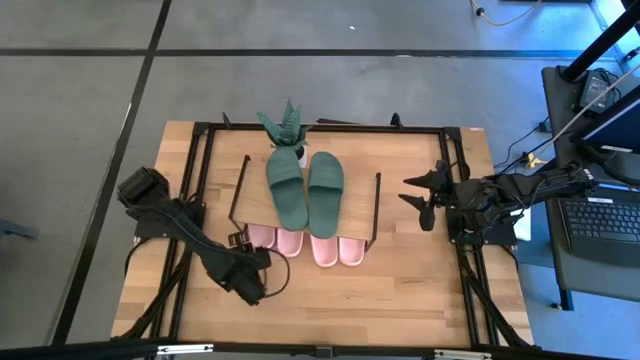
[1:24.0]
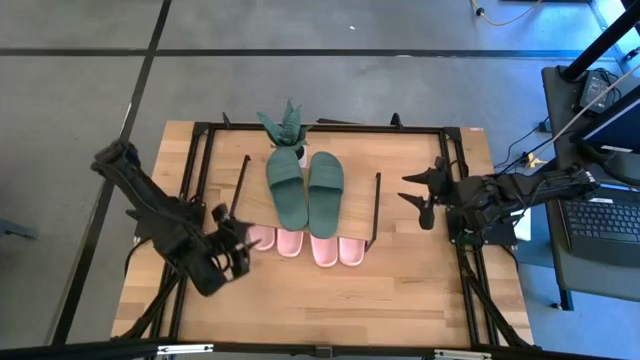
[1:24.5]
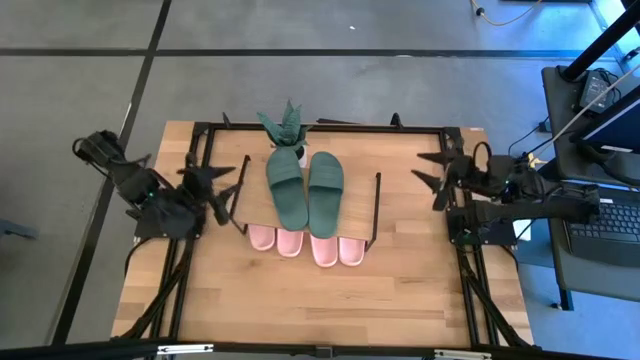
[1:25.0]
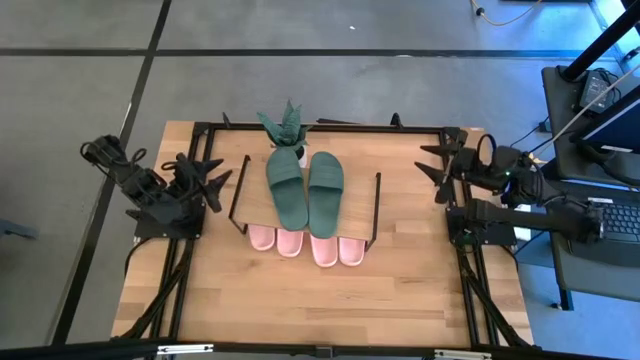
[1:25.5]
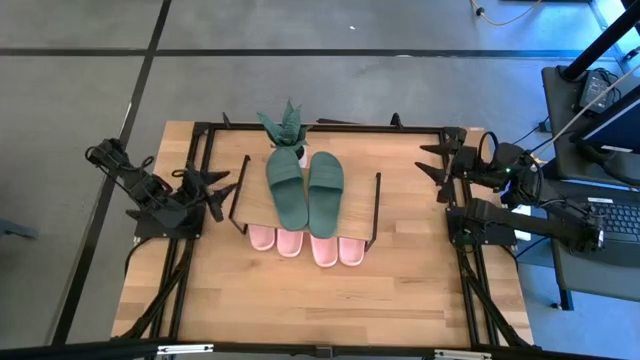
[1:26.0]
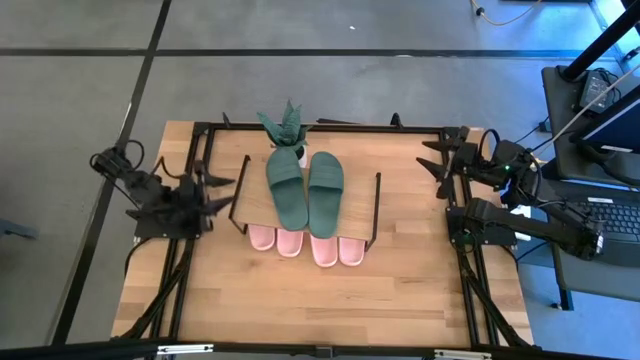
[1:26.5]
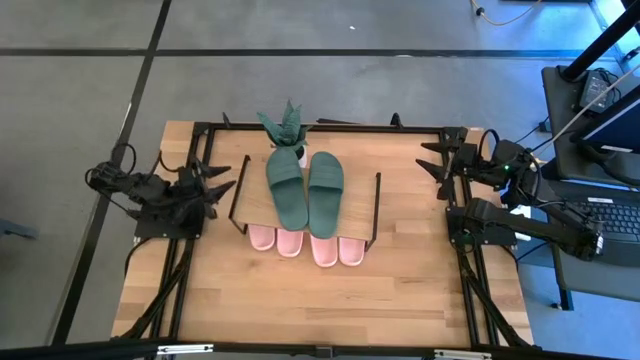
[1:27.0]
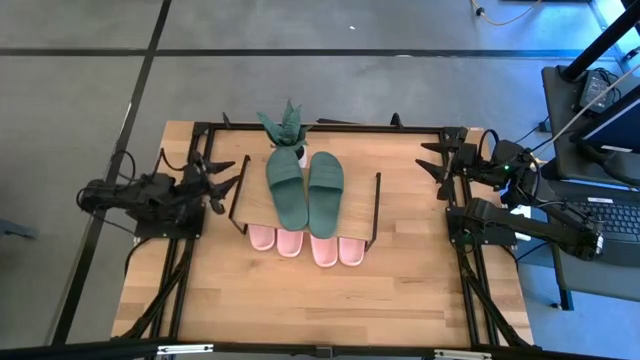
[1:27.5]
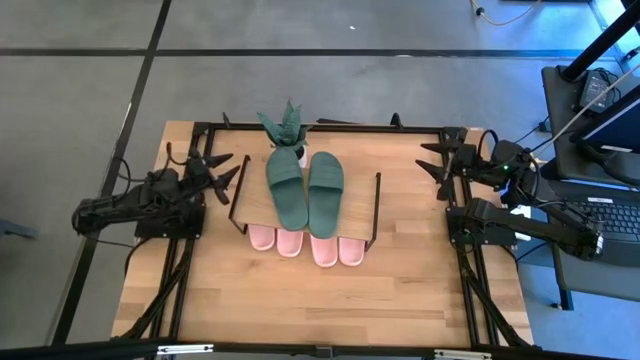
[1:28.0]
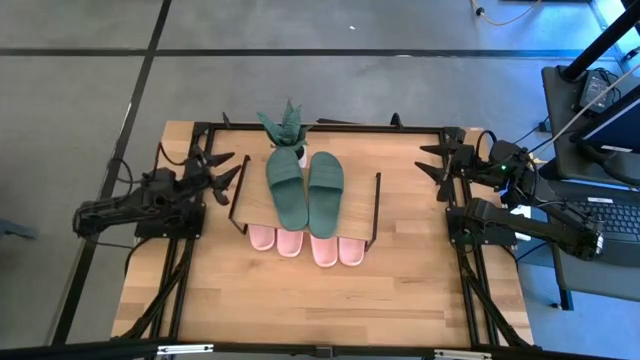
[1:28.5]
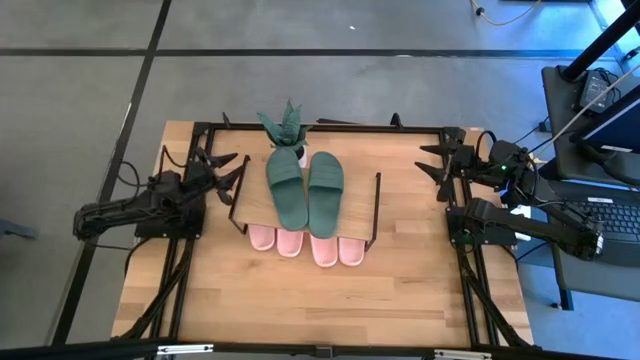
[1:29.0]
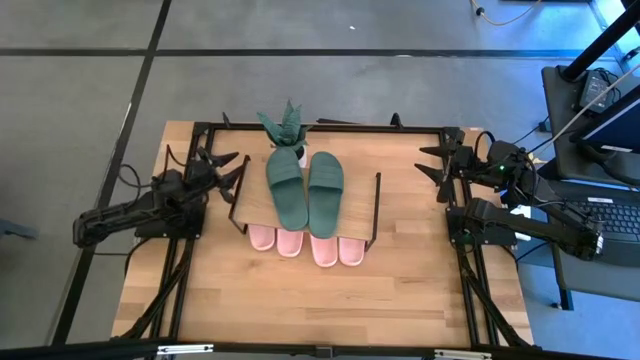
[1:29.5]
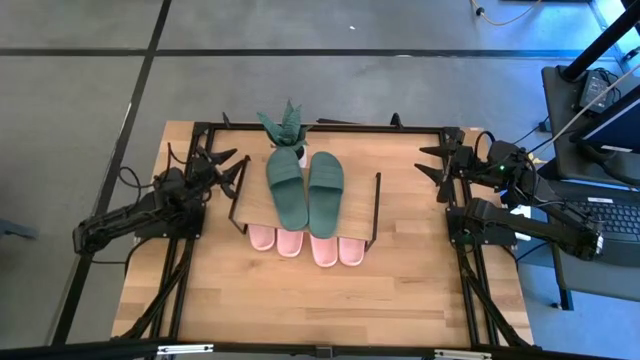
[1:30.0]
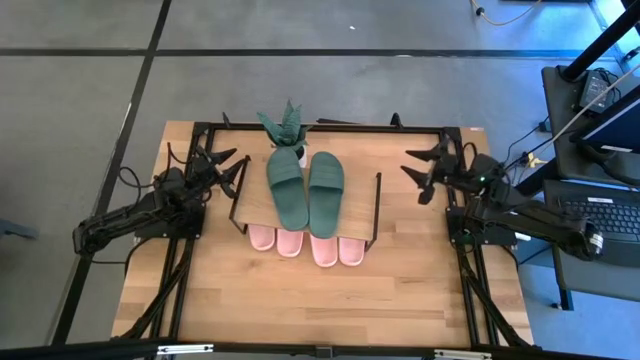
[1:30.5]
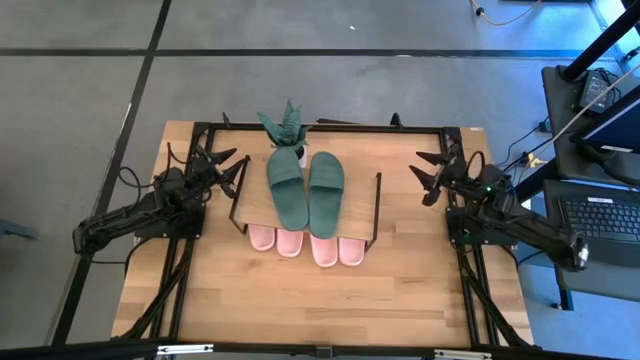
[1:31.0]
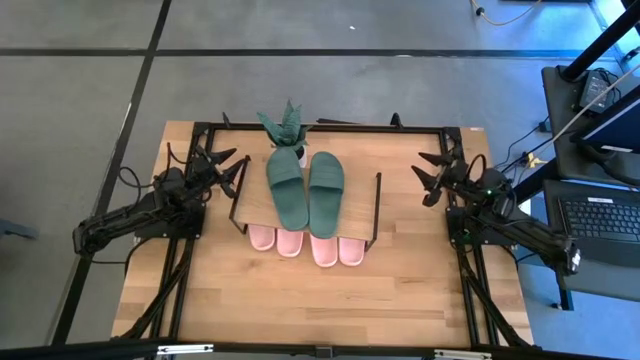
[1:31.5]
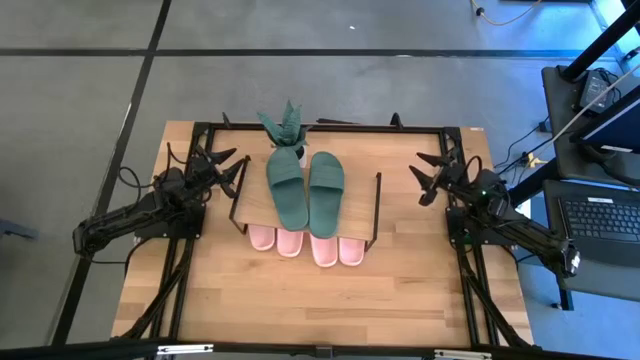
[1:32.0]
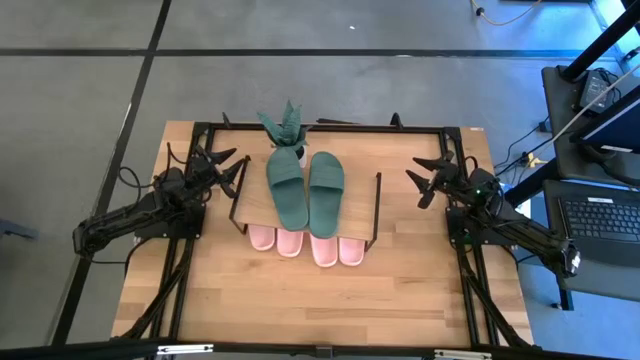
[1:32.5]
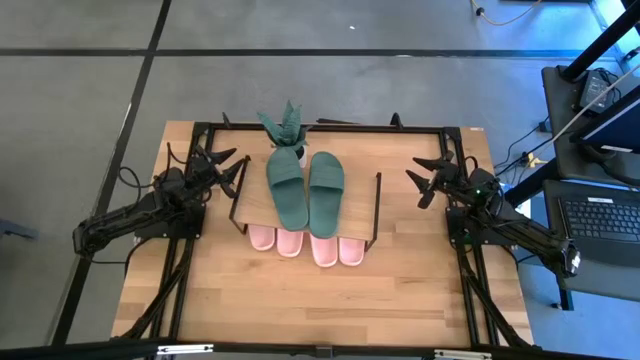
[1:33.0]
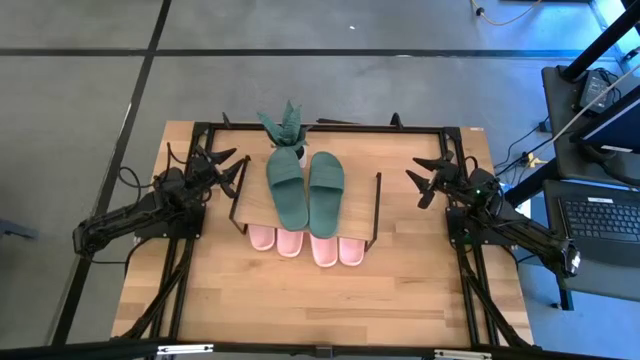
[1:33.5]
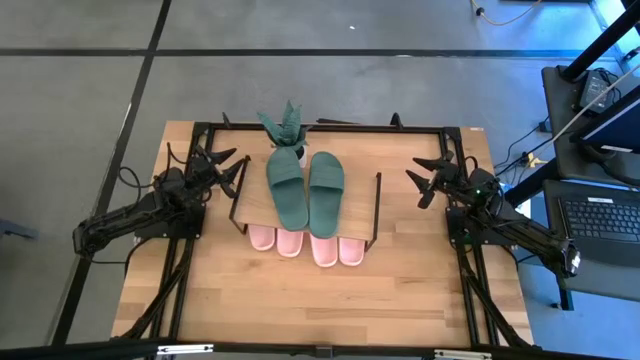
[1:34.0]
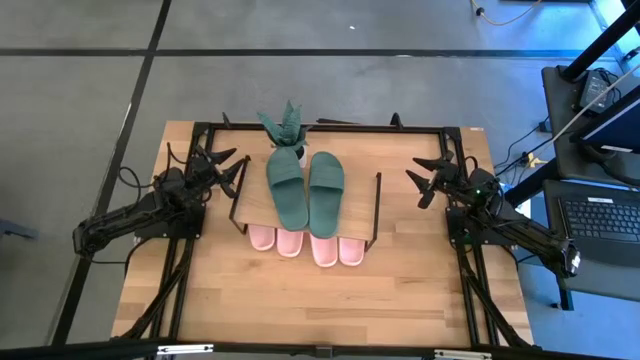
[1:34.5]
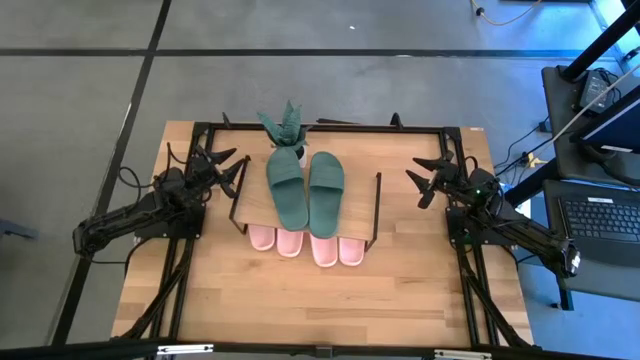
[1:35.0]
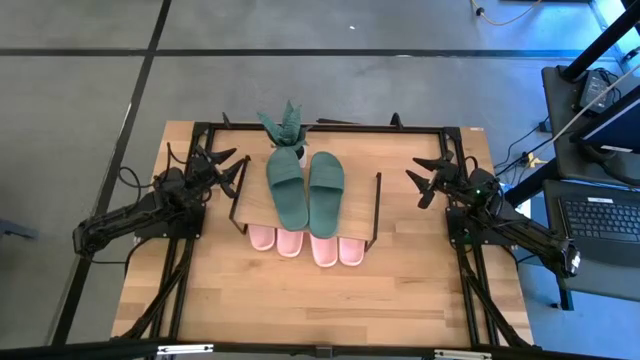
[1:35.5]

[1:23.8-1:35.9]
Task: Pick and place slides into the shelf
Return to Home Position

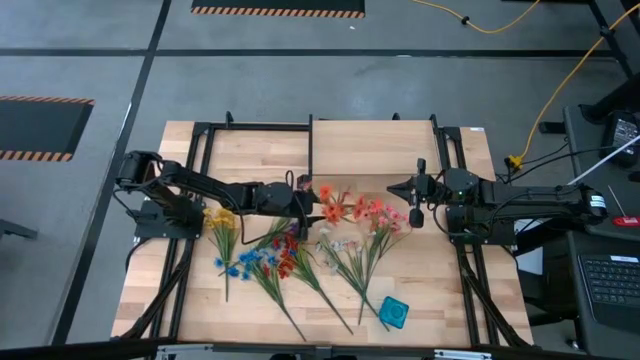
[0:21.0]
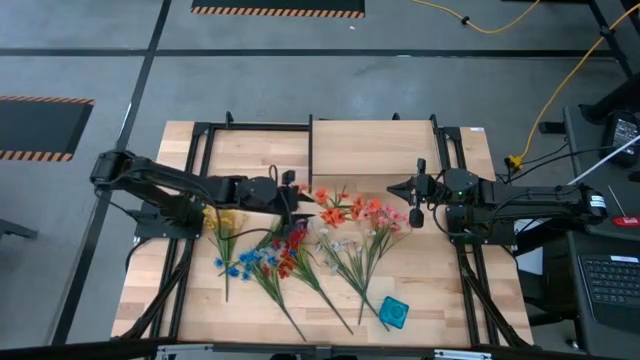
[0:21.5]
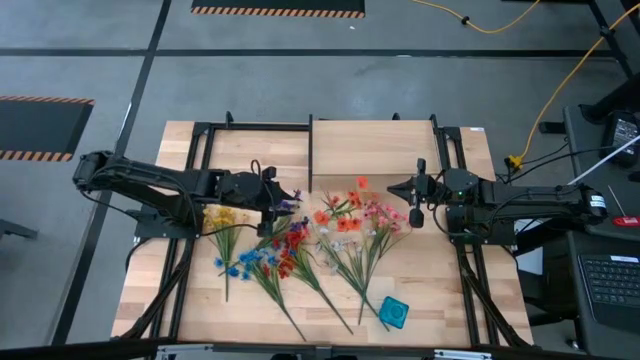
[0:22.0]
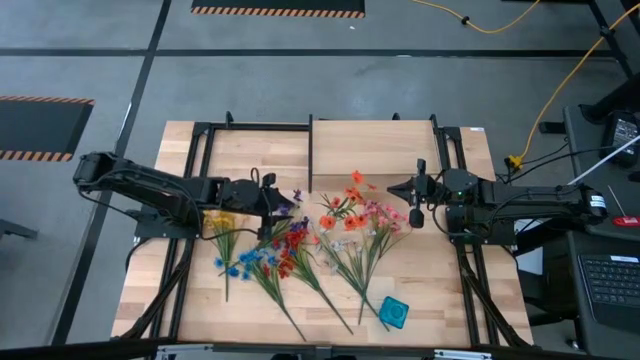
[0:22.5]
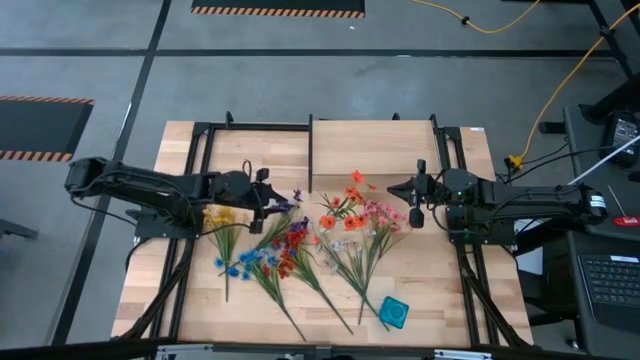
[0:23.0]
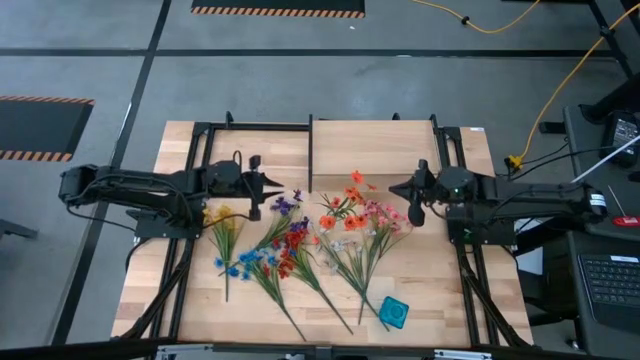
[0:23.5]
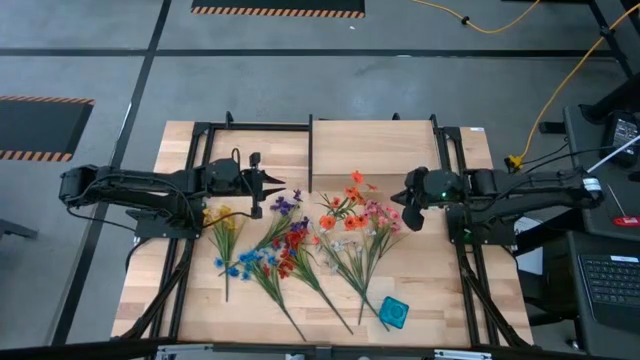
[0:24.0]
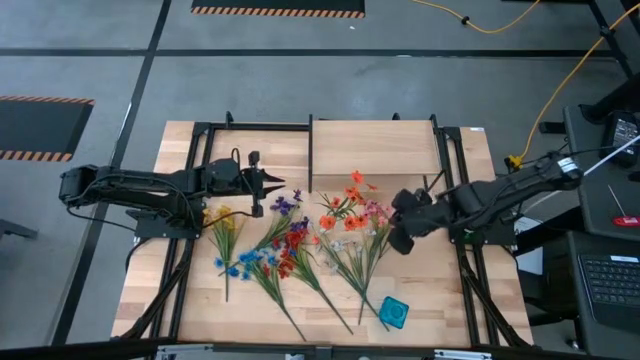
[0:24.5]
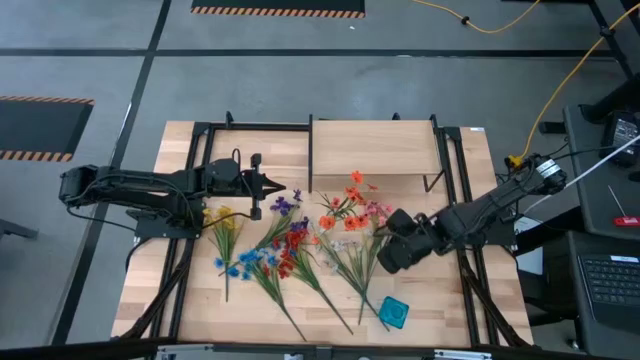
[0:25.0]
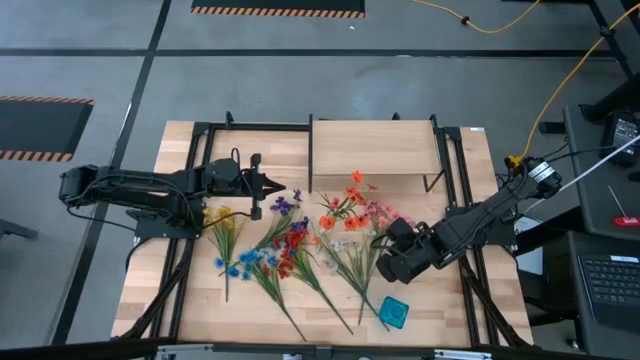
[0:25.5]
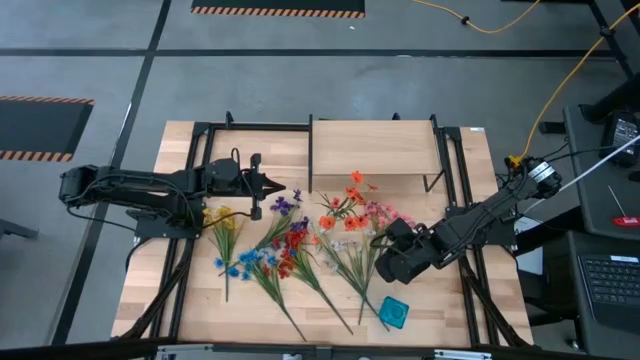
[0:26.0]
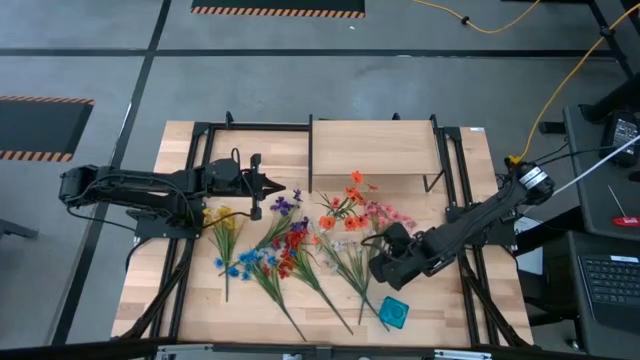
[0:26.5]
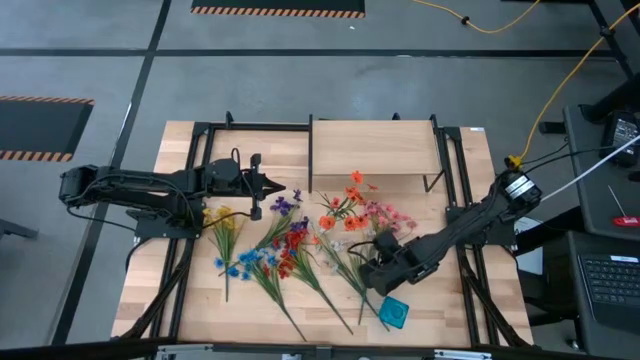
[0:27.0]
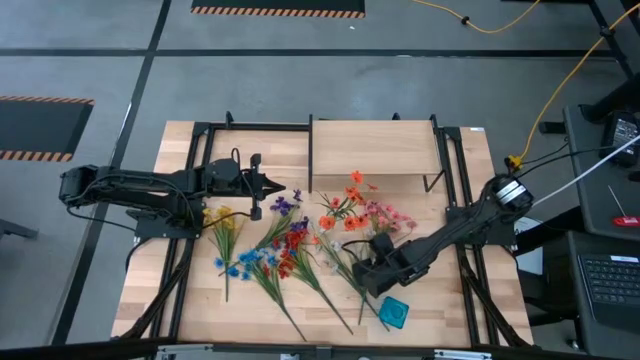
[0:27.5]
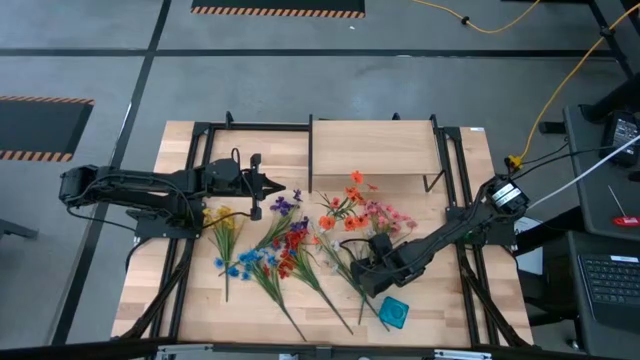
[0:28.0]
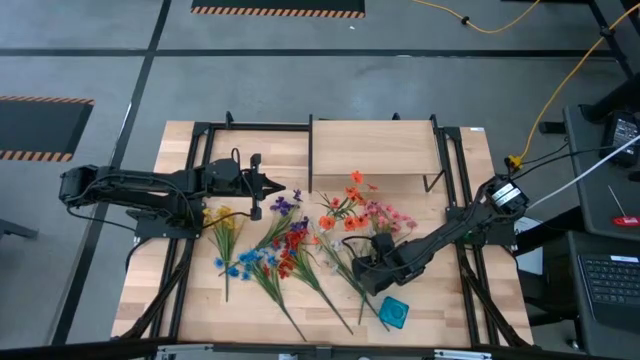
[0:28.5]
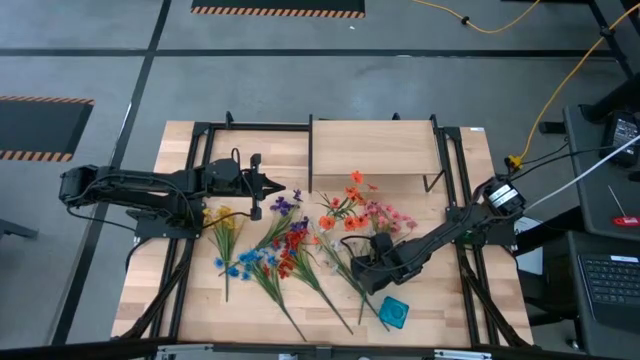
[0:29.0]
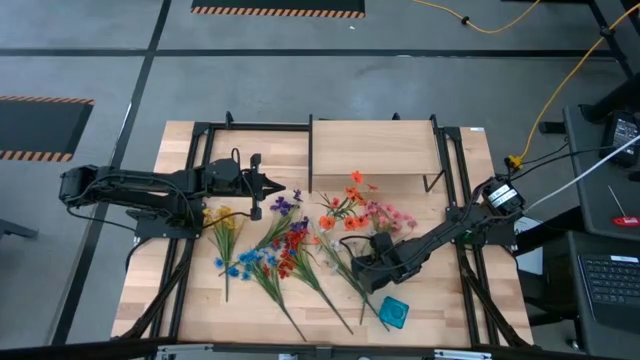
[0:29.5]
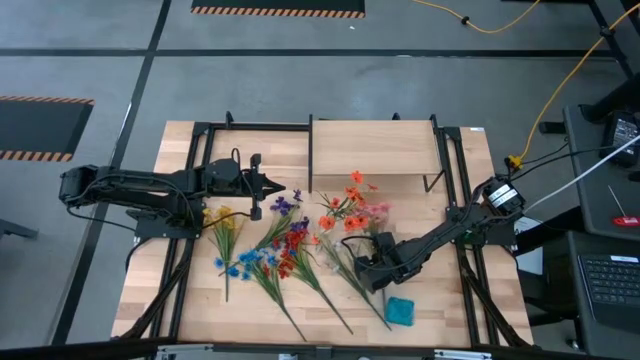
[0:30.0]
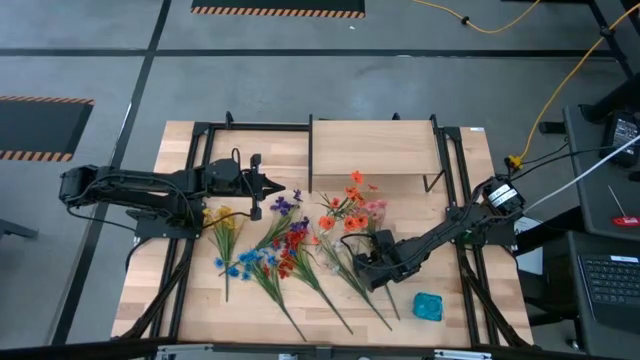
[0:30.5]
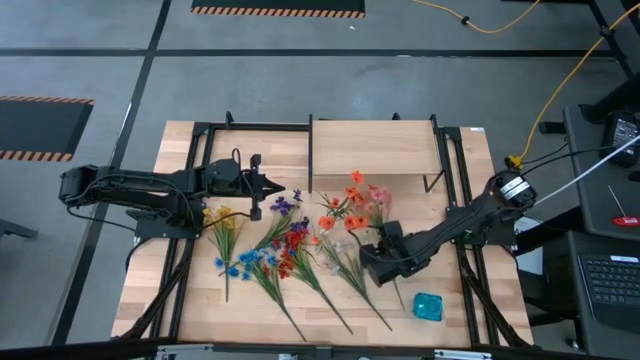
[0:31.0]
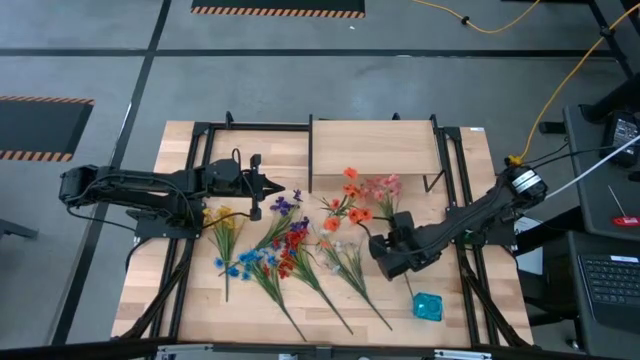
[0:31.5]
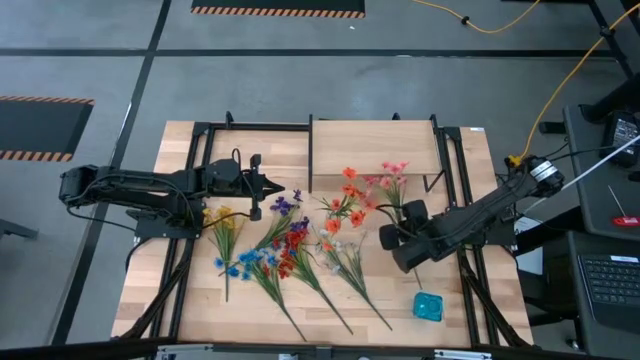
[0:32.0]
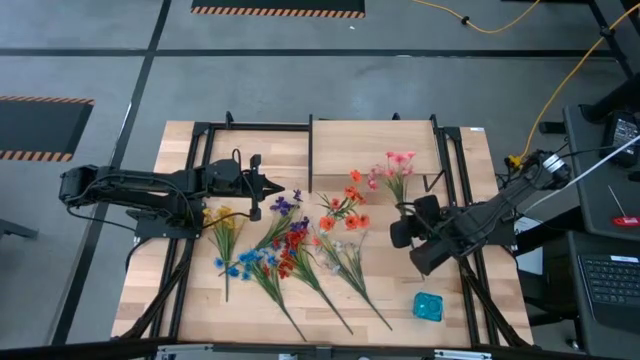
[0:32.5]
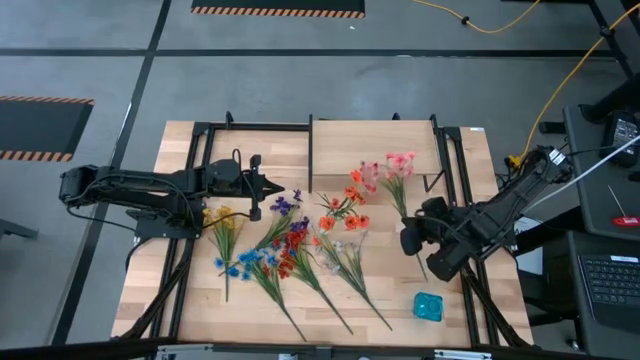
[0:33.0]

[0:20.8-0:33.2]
Task: Pick and place flowers into a vace then onto a shelf
Put the pink flowers into the transparent vase
